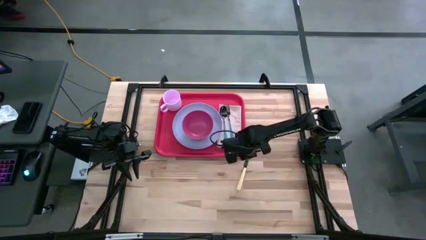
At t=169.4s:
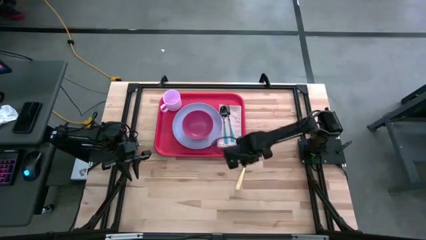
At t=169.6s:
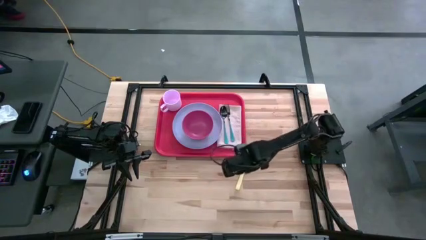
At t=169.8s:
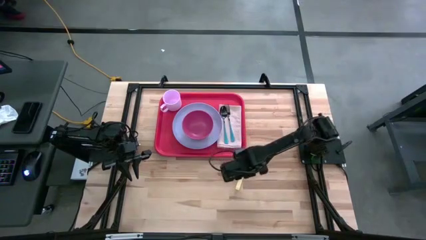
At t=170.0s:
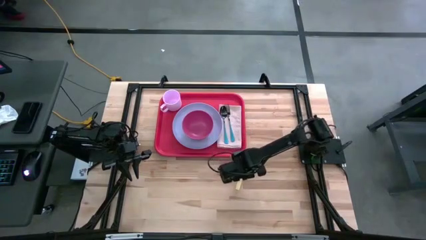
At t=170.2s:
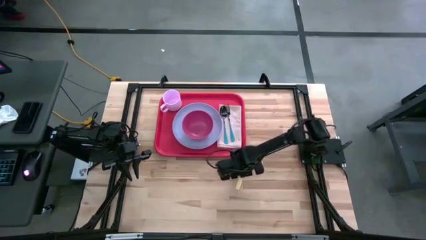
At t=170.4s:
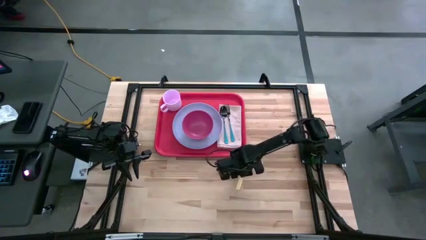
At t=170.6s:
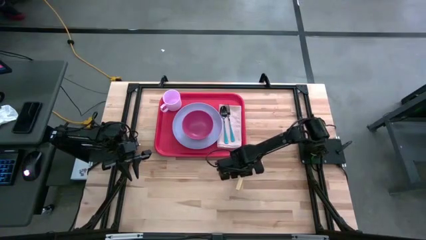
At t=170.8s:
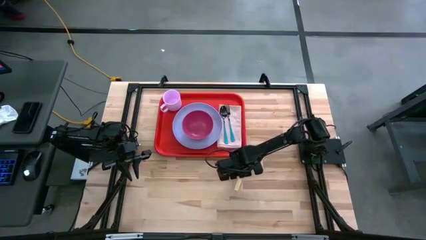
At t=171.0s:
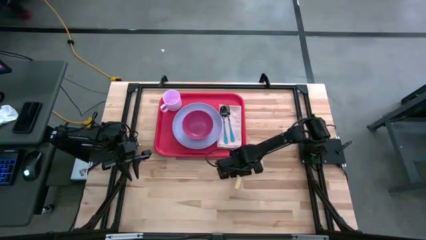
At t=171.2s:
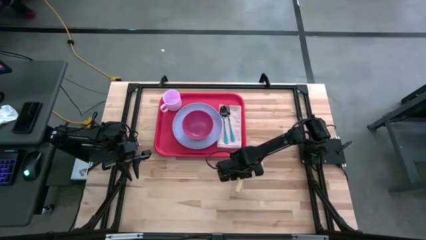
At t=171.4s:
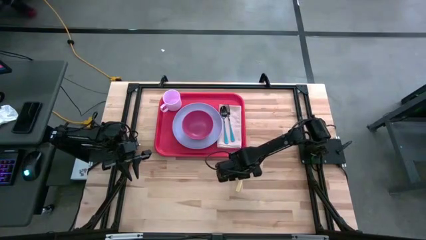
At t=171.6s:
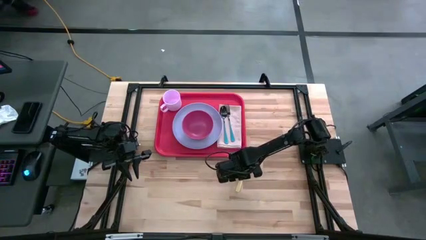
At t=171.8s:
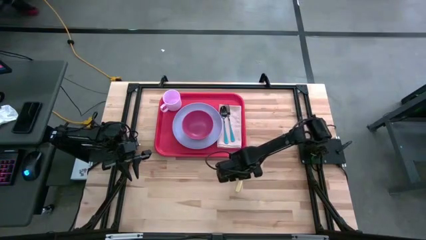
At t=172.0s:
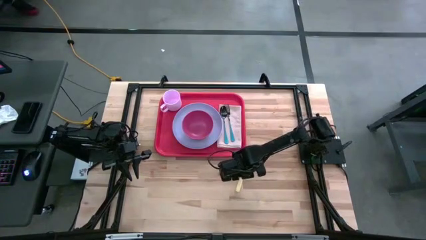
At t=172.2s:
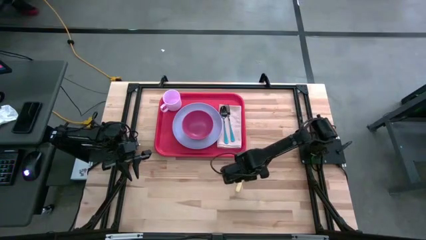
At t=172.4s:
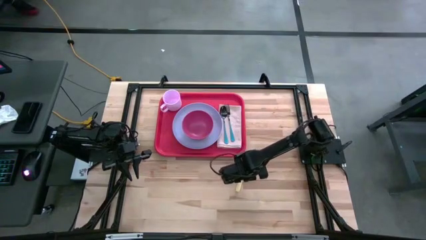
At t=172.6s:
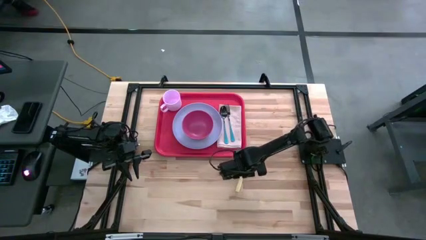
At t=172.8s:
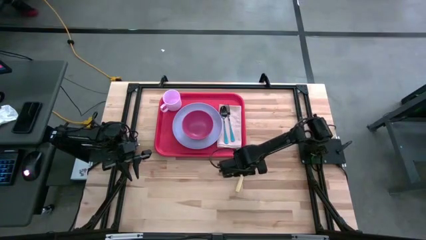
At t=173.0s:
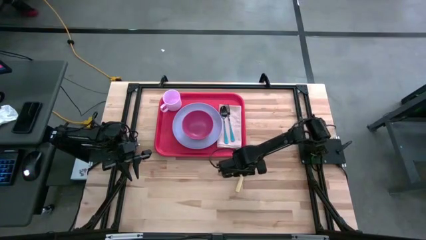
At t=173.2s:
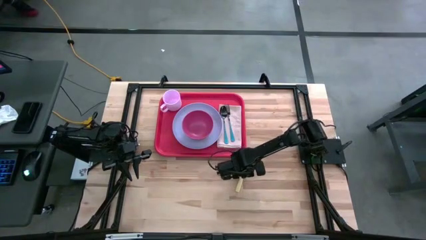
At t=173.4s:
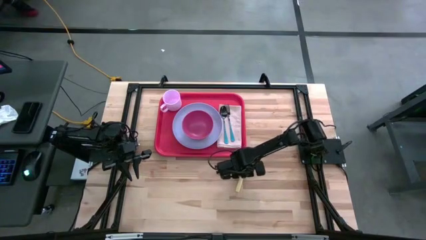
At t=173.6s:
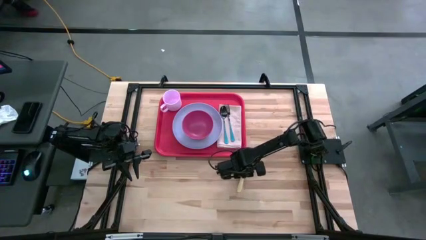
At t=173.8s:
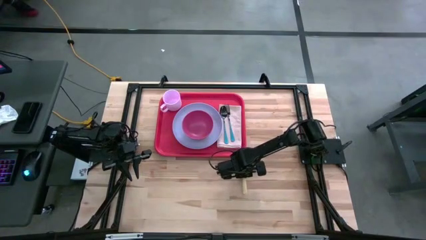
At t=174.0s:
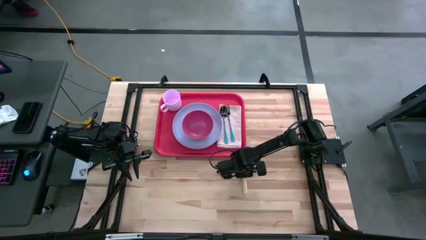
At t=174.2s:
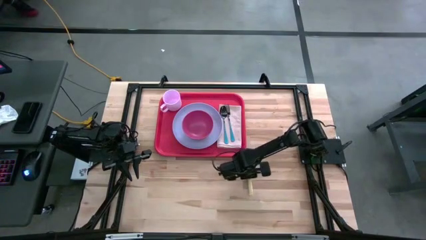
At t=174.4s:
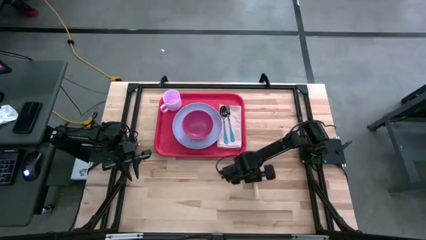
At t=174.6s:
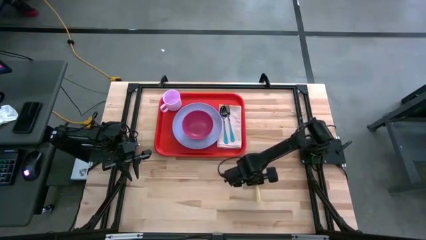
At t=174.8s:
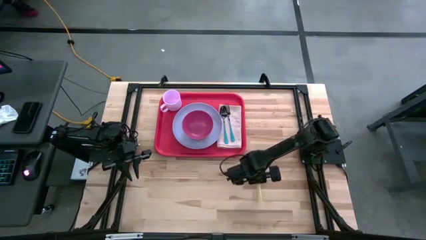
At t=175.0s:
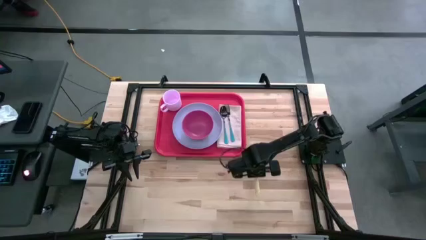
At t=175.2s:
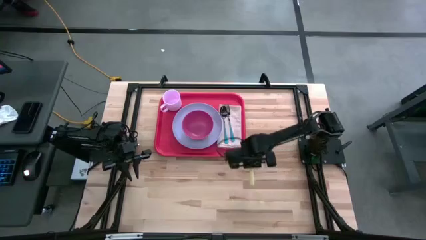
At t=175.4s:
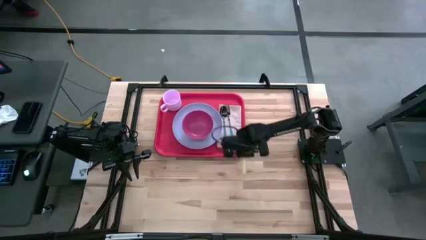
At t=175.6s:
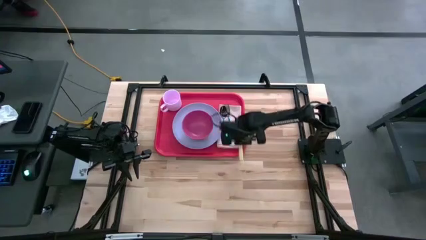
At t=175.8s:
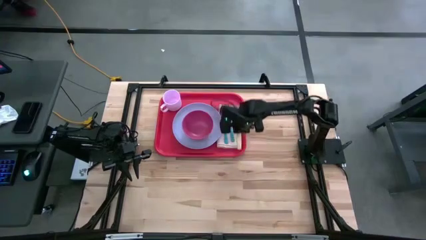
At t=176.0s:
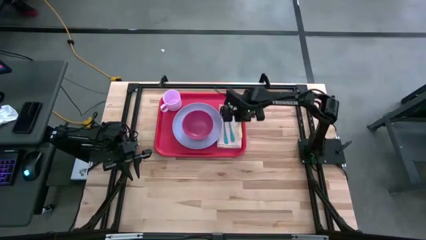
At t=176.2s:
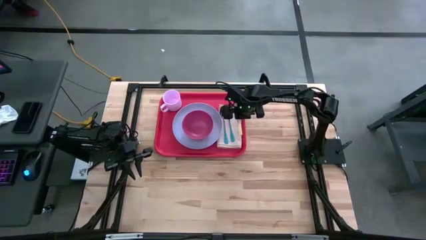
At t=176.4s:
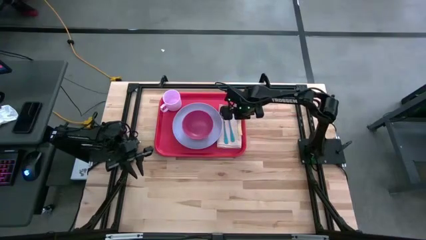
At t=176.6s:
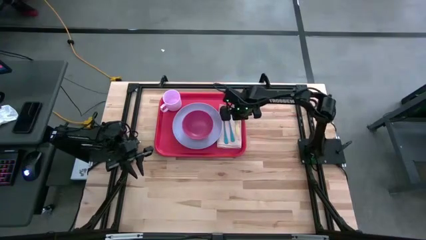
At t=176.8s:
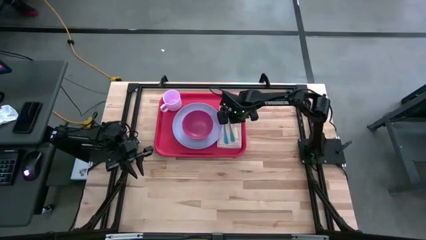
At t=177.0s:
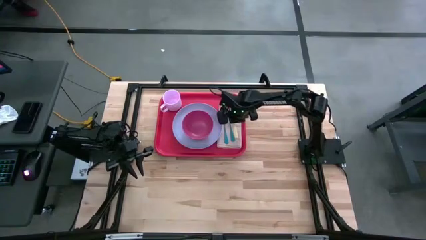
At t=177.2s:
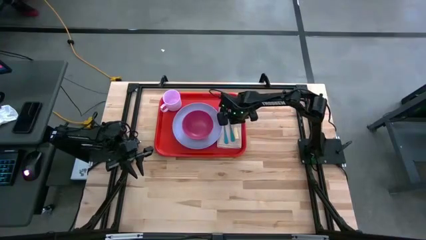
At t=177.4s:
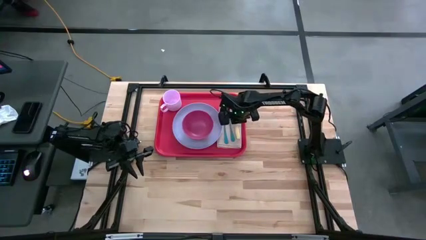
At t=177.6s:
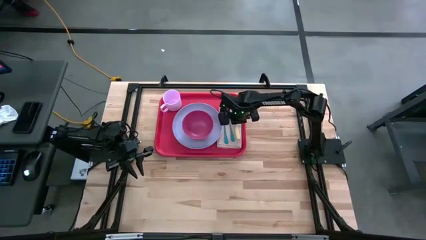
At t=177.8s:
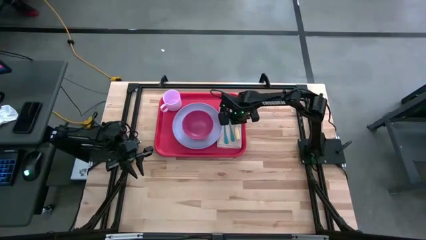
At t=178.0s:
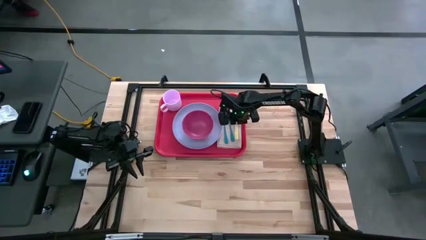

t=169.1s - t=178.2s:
Task: Set up tray
Put the yellow knife on the white table napkin to the right of the blue fork

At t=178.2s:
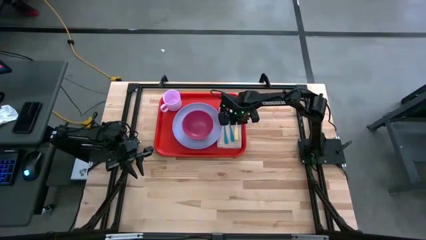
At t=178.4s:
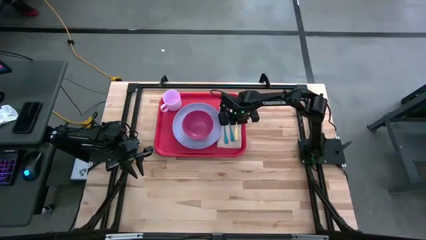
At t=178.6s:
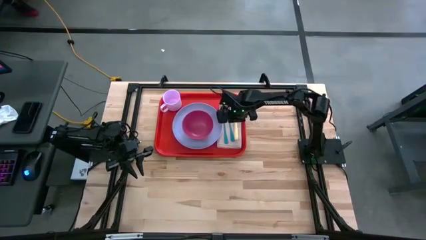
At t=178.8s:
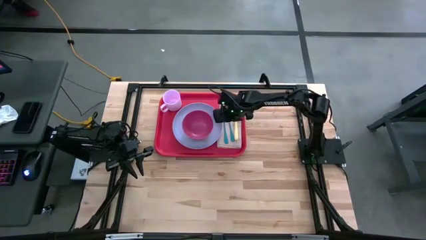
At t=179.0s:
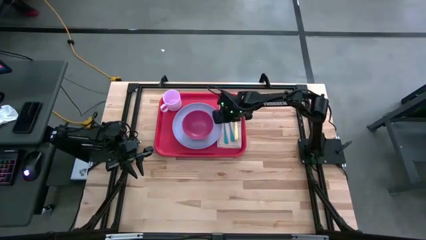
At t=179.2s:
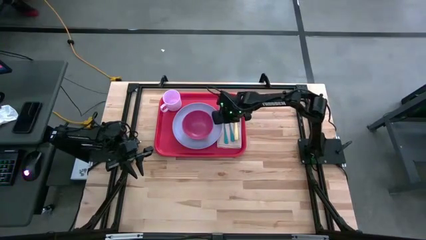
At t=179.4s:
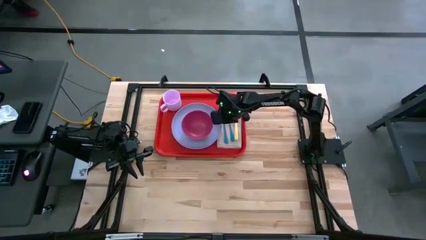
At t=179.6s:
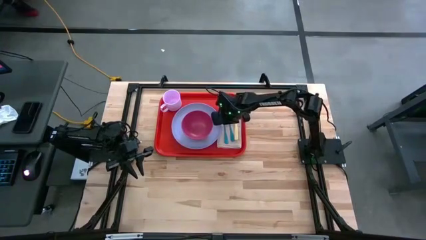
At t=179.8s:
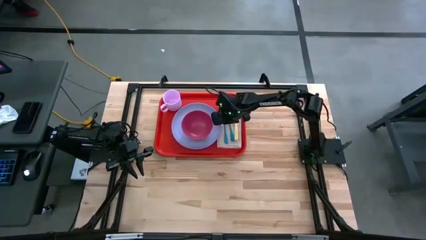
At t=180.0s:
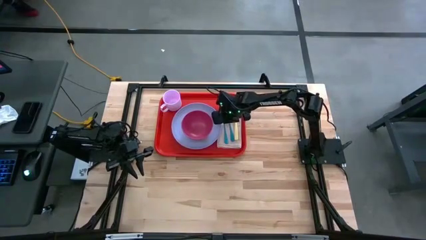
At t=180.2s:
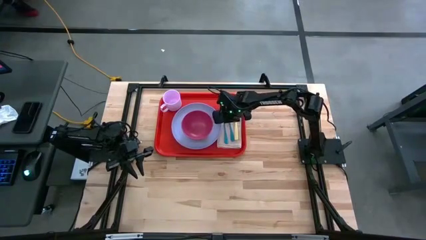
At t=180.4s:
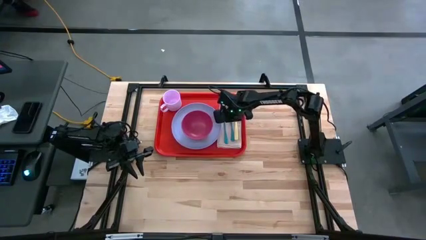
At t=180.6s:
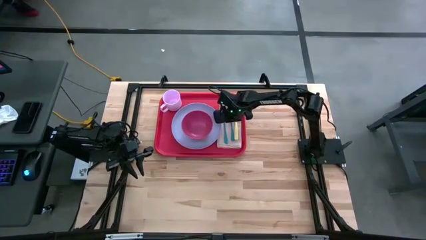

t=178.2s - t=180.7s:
Adjust the blue fork on the white table napkin
